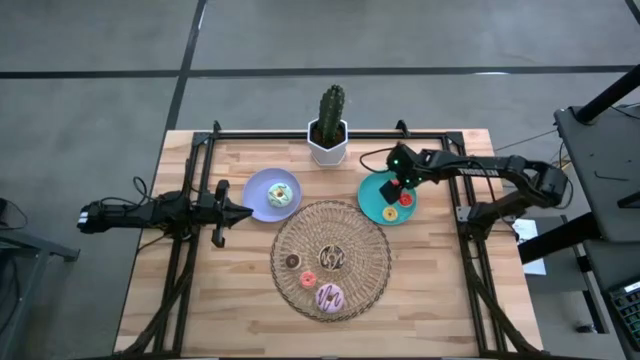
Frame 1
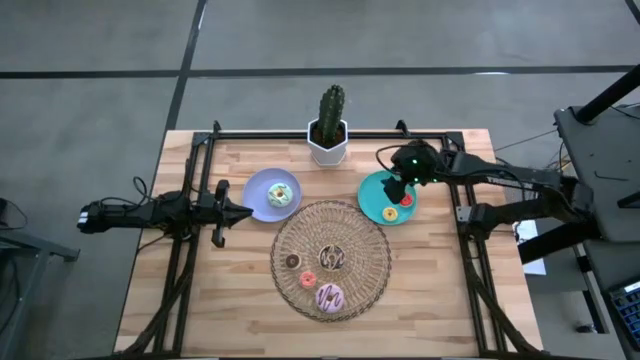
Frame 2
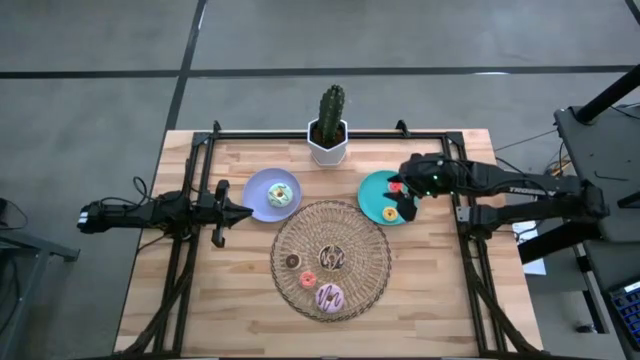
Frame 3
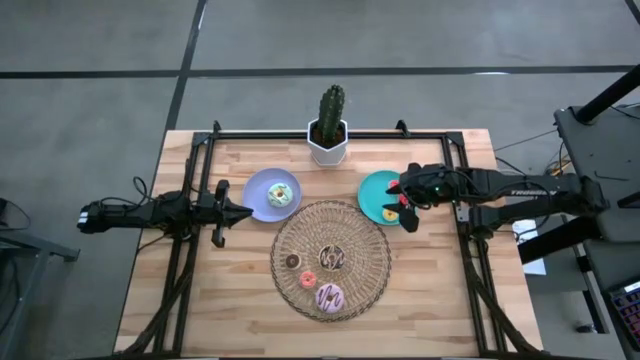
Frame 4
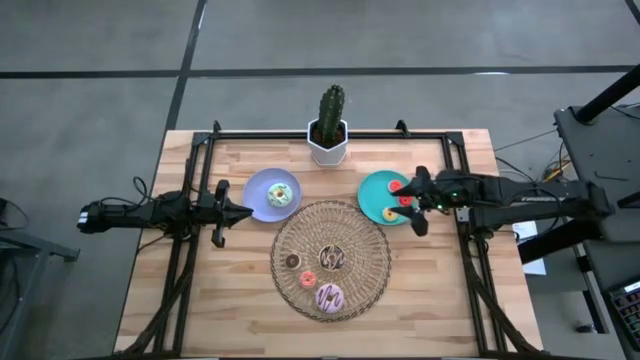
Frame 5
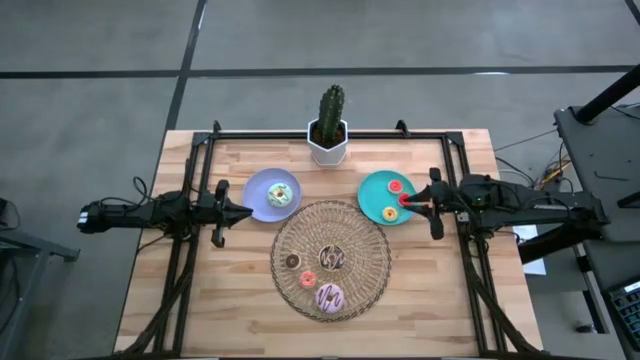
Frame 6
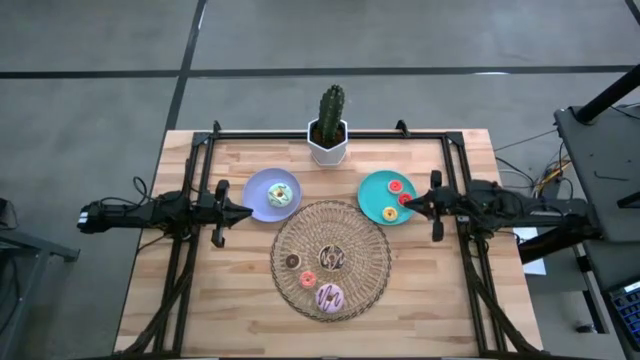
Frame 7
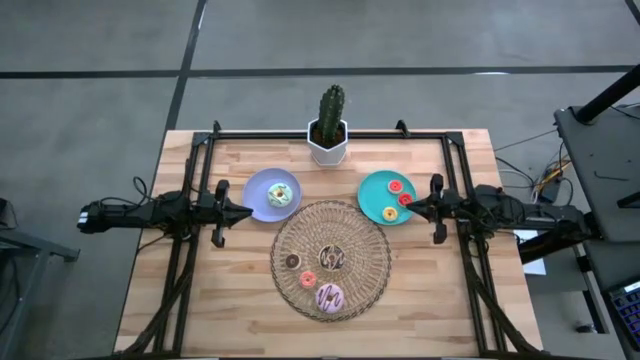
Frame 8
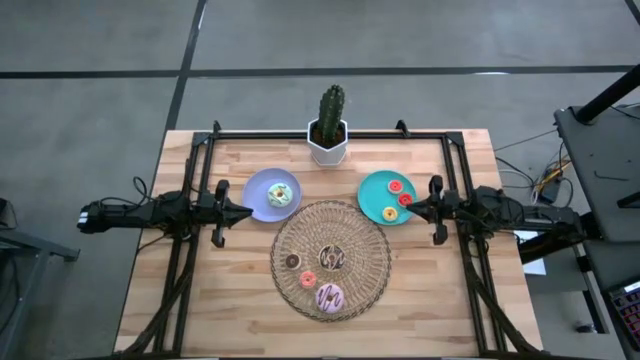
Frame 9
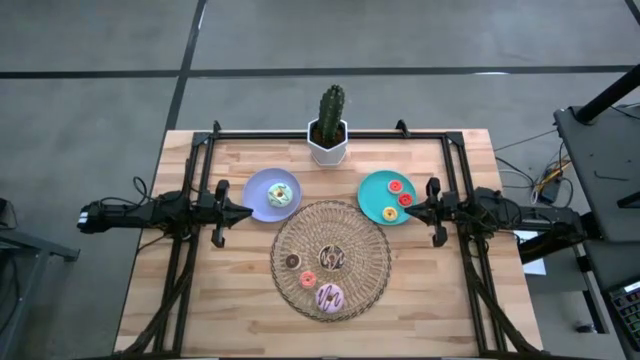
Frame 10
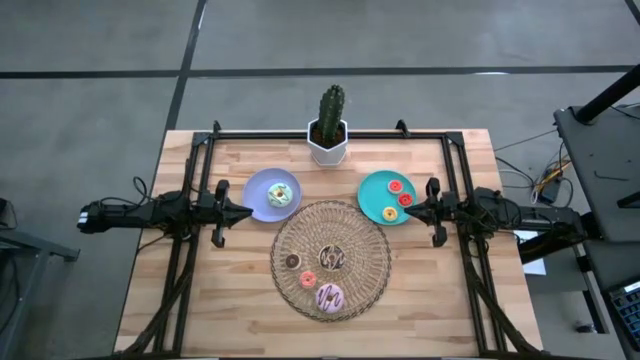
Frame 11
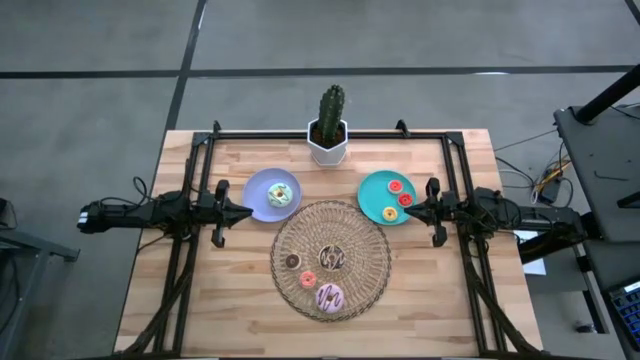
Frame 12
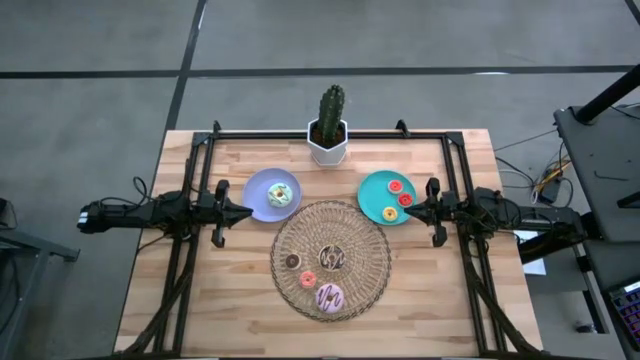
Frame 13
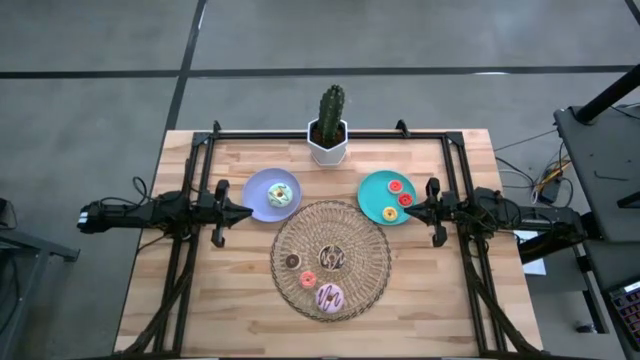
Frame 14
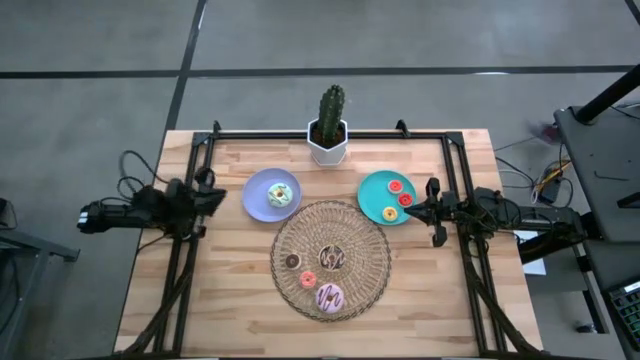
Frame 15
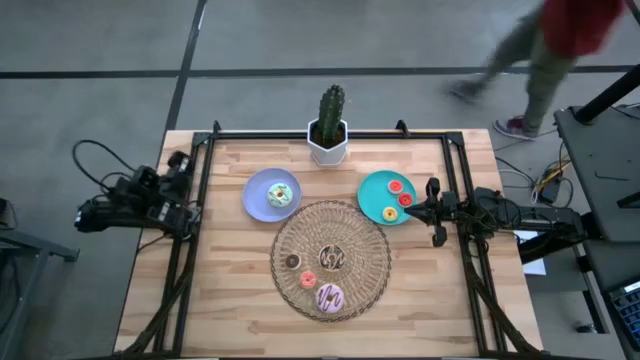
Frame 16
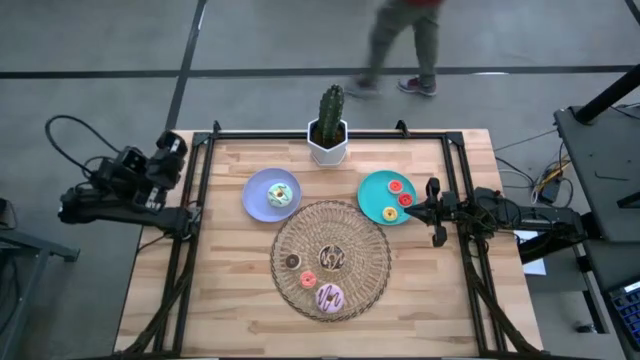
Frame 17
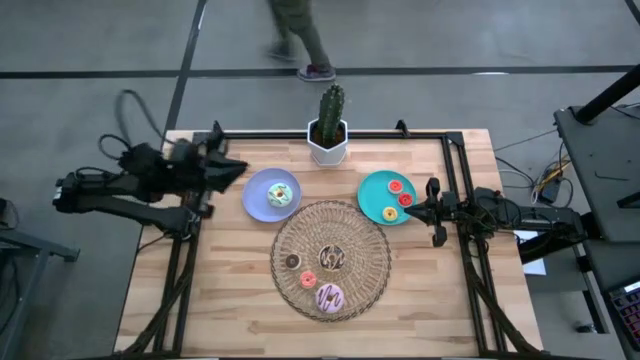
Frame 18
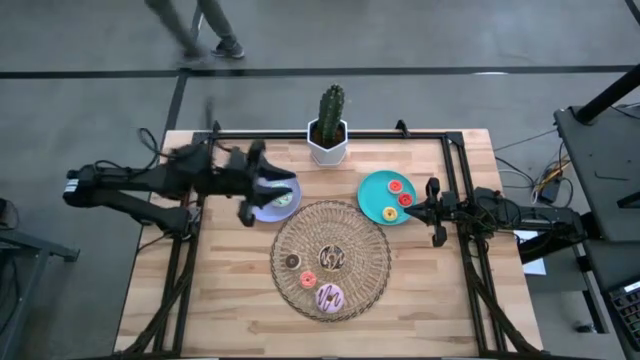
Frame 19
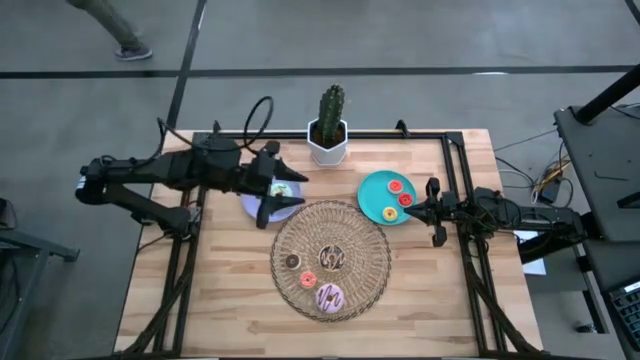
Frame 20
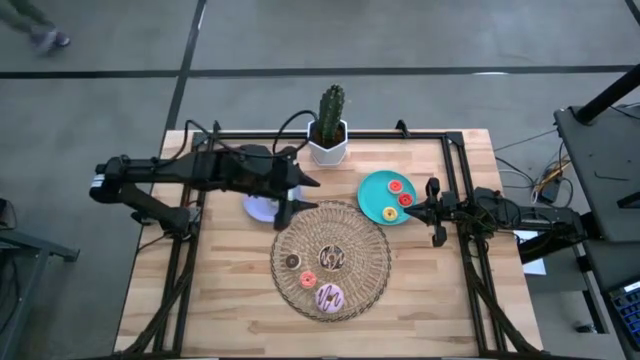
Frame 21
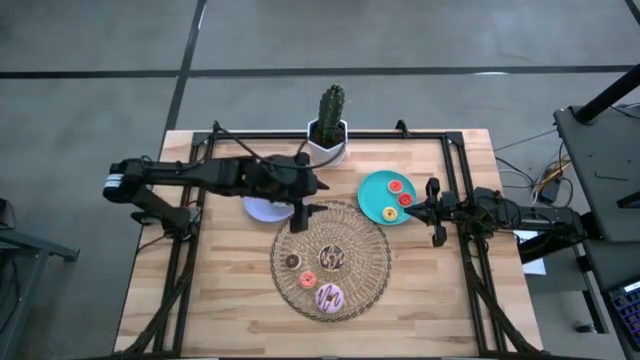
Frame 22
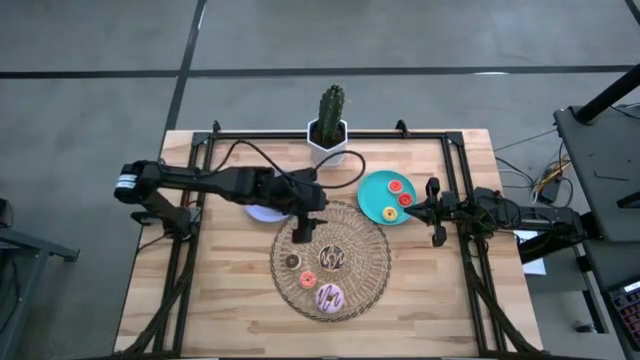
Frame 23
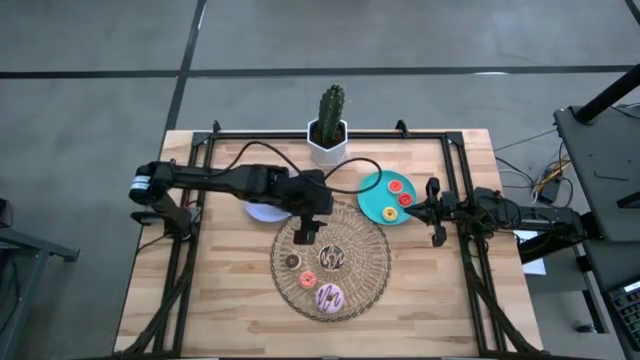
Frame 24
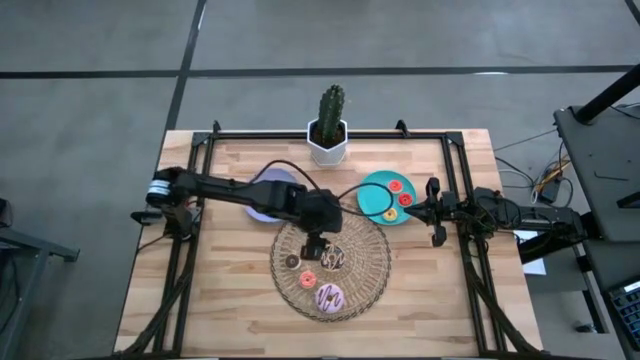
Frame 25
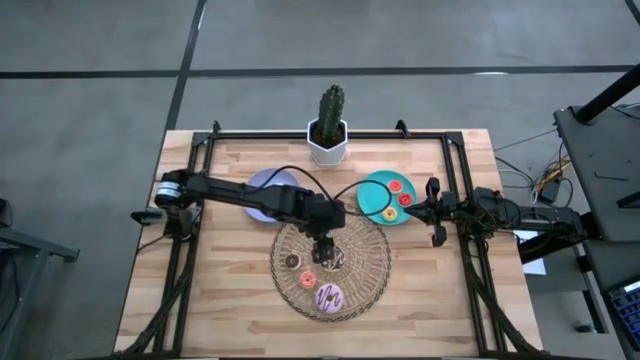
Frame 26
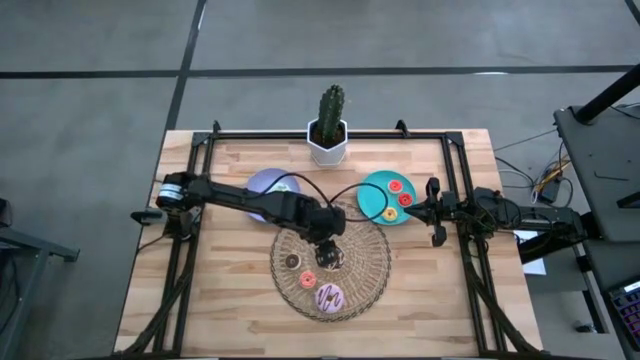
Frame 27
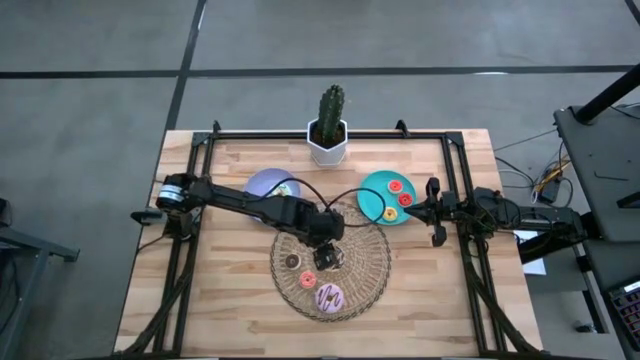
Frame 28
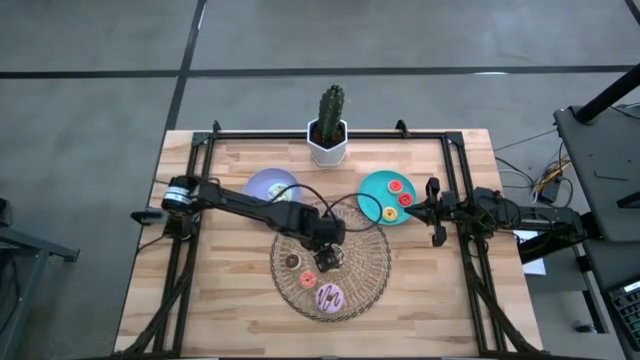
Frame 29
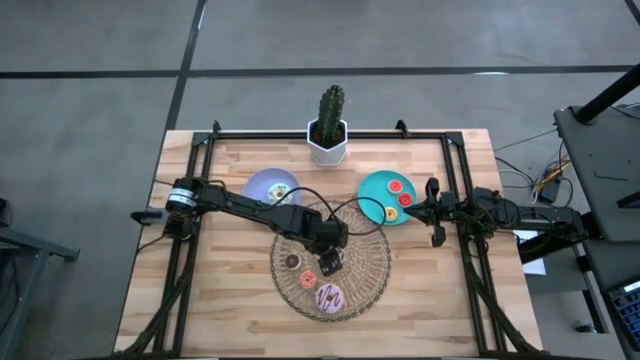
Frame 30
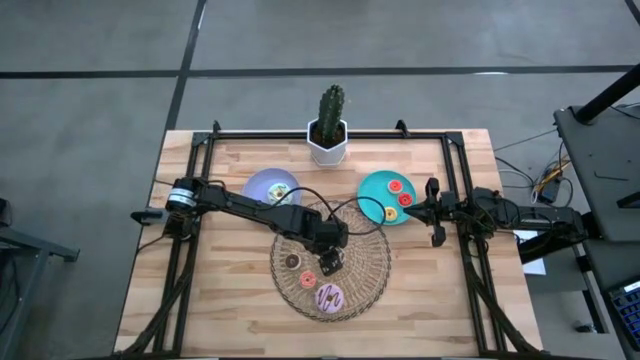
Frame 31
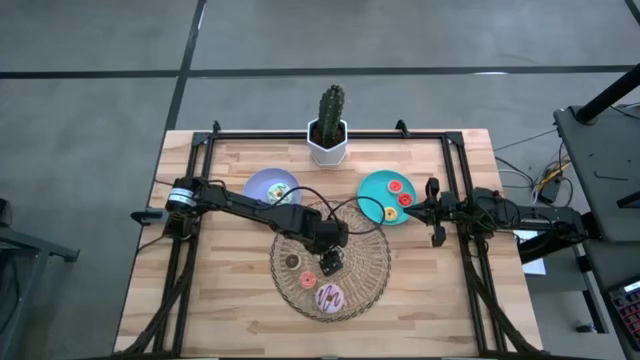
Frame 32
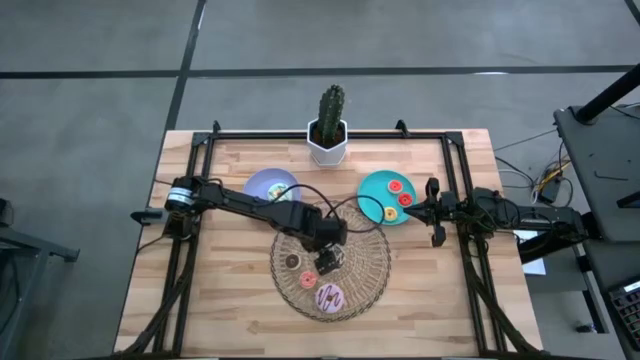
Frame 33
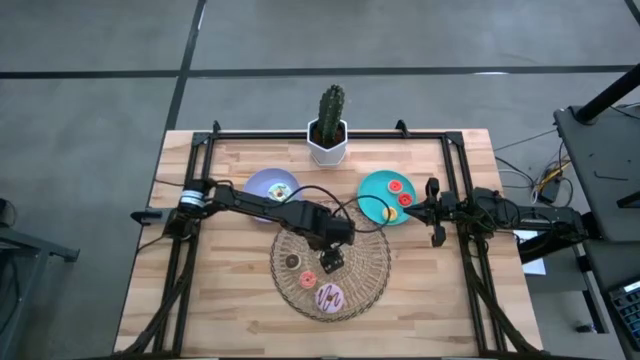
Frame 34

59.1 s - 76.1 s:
Task: Pick & Place donuts
Put the large black donut on the purple plate
